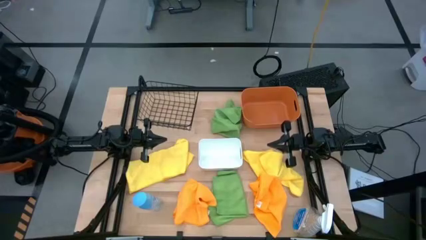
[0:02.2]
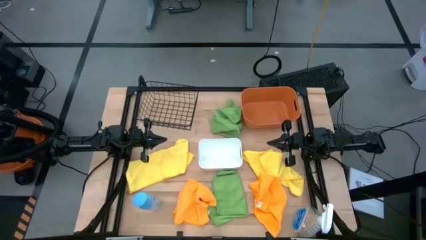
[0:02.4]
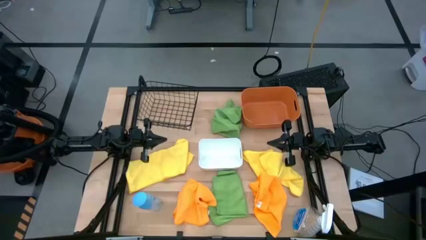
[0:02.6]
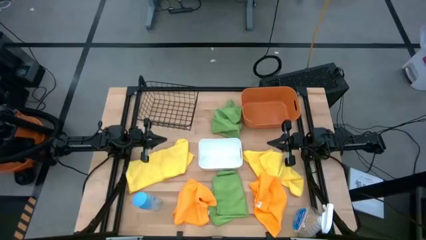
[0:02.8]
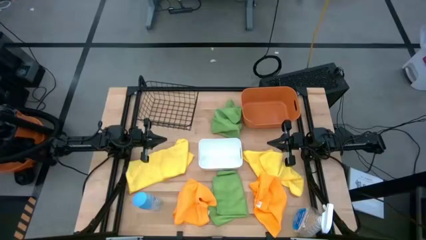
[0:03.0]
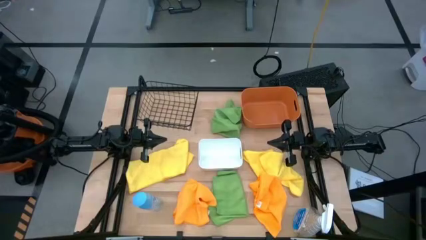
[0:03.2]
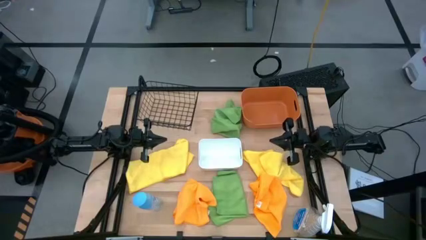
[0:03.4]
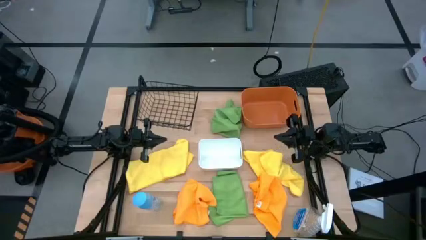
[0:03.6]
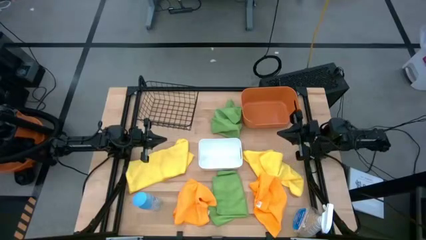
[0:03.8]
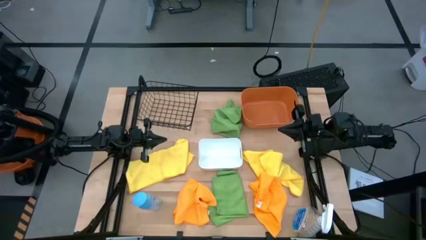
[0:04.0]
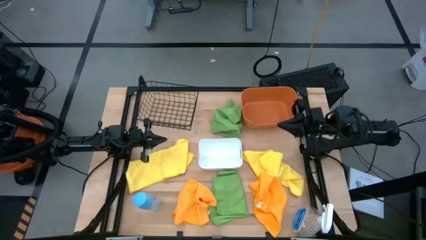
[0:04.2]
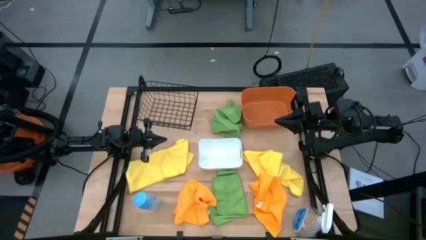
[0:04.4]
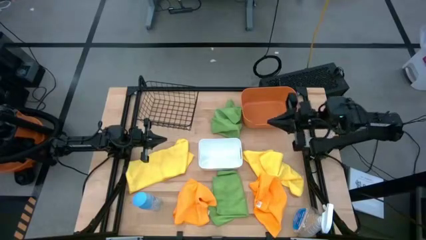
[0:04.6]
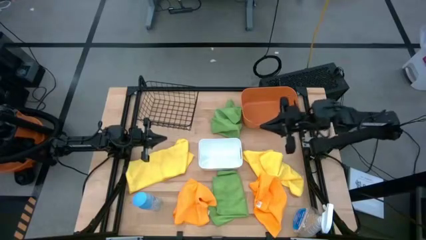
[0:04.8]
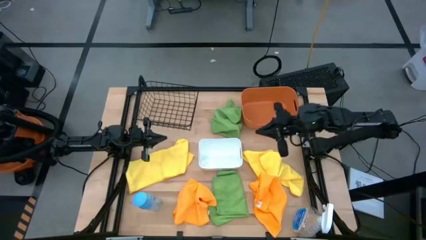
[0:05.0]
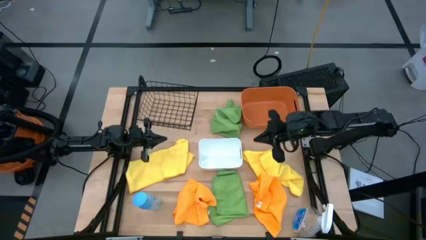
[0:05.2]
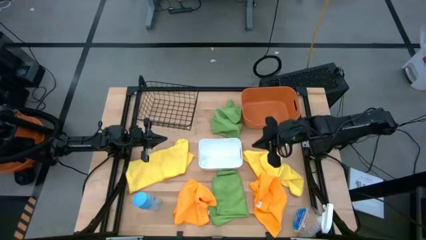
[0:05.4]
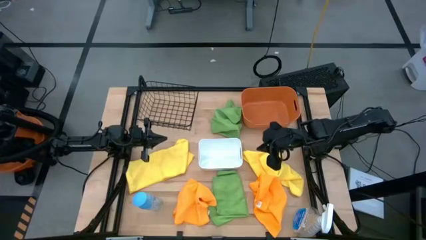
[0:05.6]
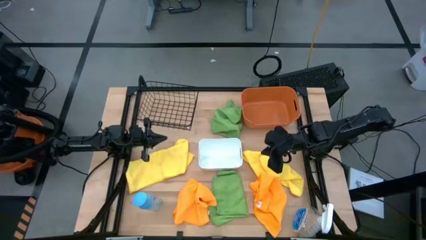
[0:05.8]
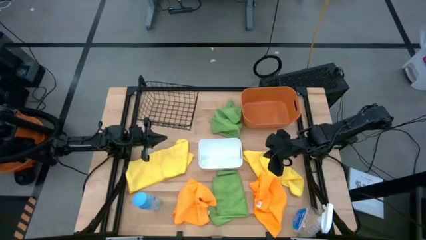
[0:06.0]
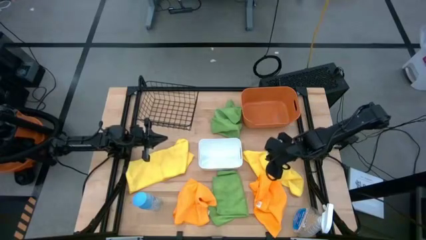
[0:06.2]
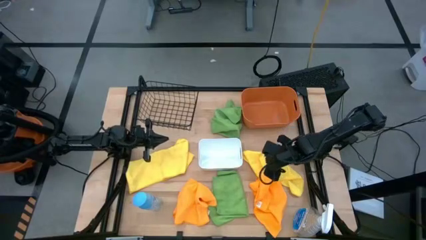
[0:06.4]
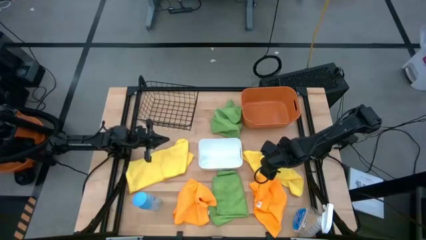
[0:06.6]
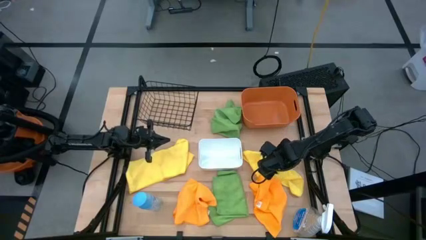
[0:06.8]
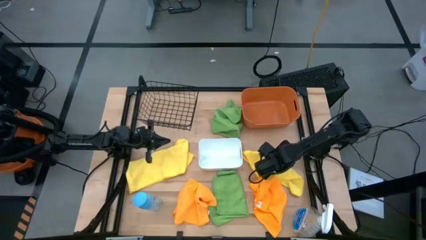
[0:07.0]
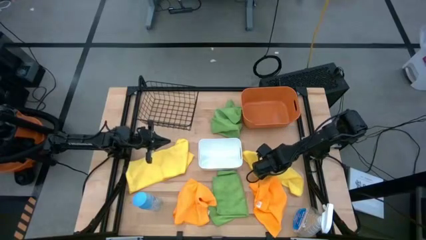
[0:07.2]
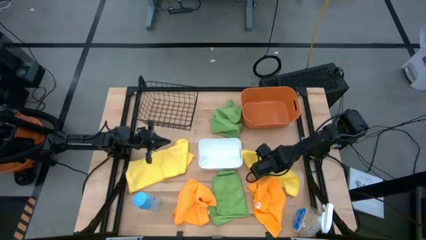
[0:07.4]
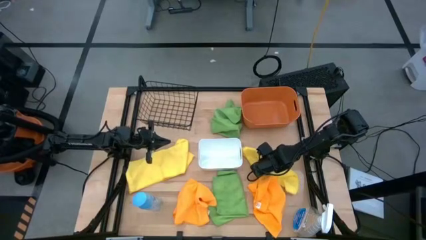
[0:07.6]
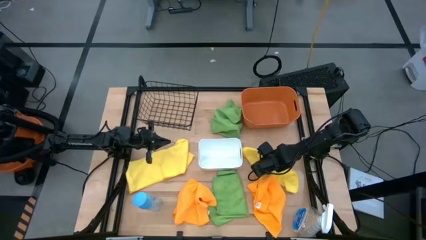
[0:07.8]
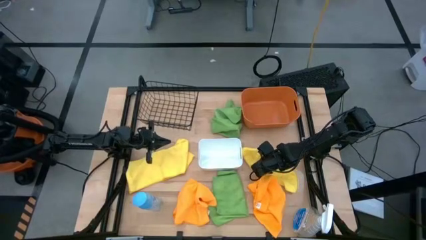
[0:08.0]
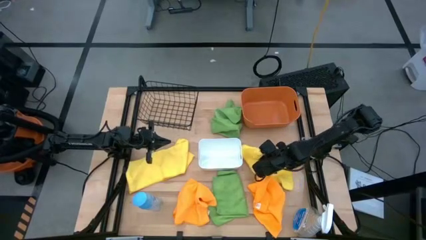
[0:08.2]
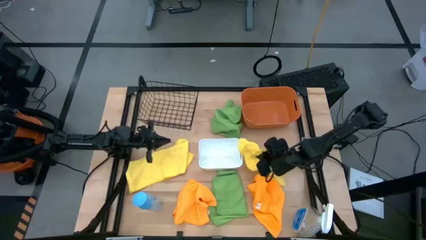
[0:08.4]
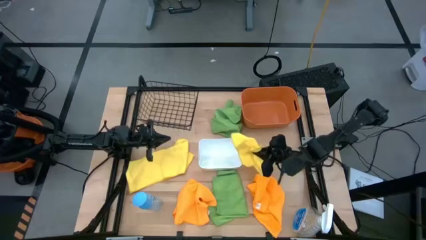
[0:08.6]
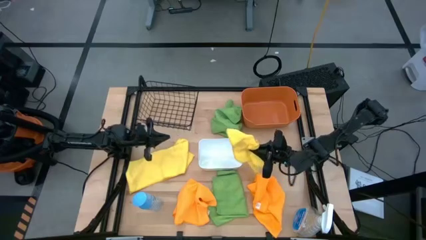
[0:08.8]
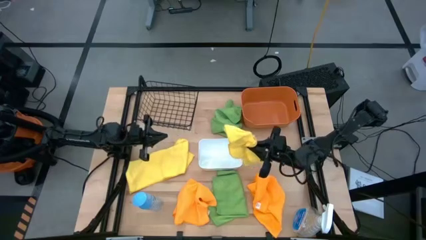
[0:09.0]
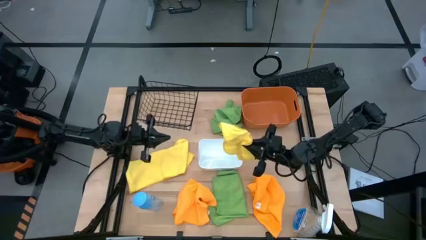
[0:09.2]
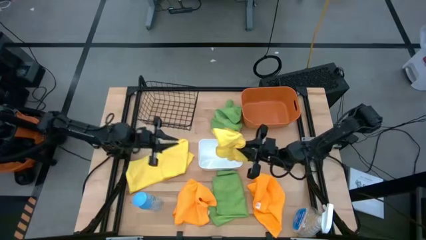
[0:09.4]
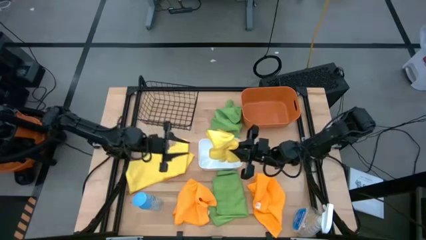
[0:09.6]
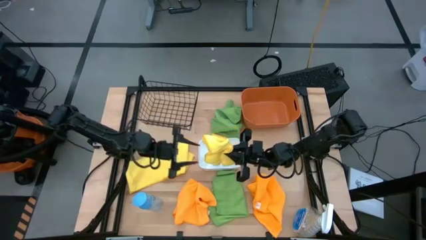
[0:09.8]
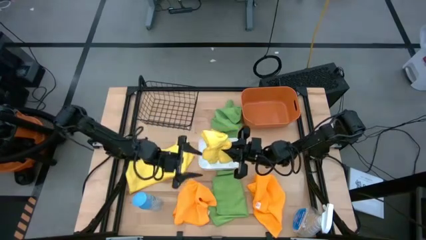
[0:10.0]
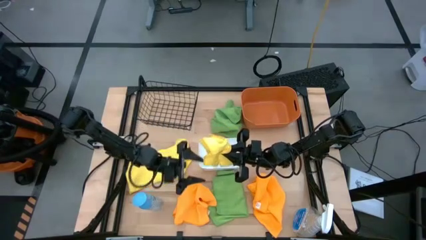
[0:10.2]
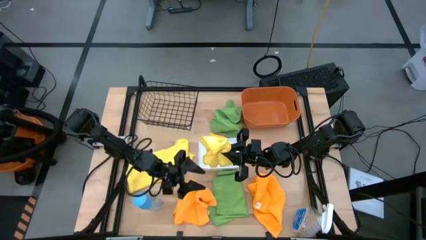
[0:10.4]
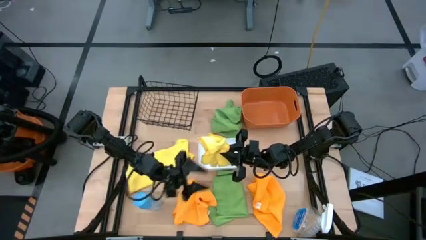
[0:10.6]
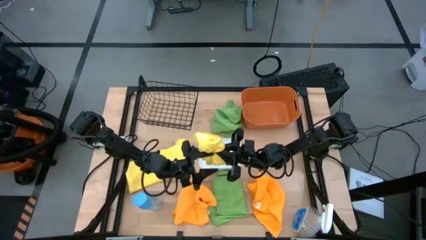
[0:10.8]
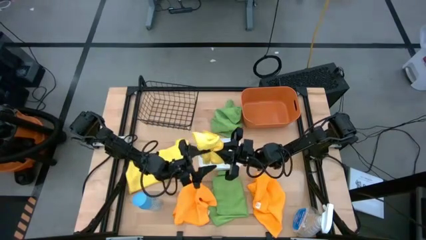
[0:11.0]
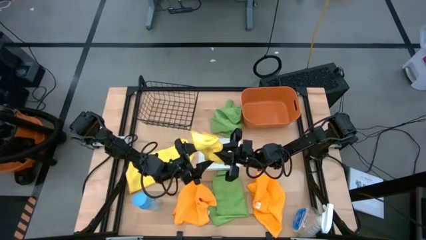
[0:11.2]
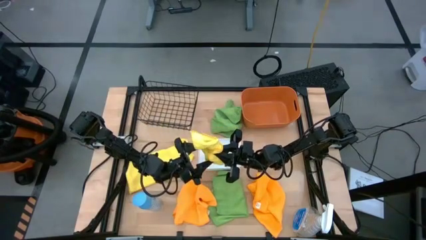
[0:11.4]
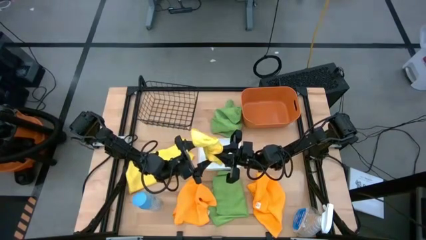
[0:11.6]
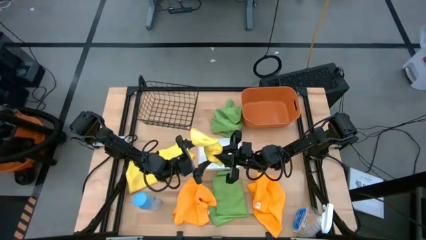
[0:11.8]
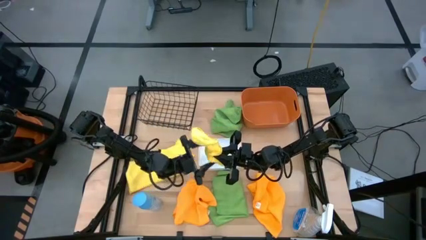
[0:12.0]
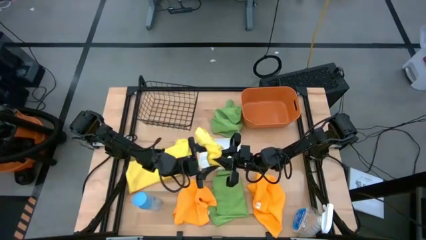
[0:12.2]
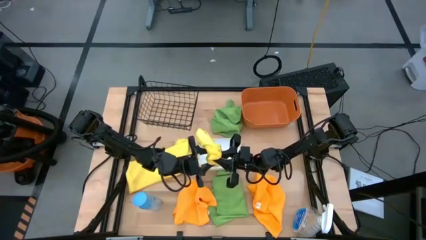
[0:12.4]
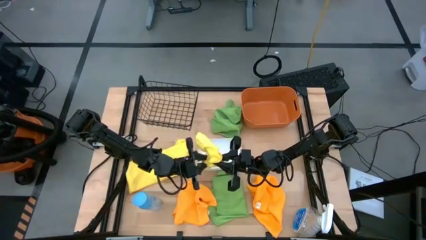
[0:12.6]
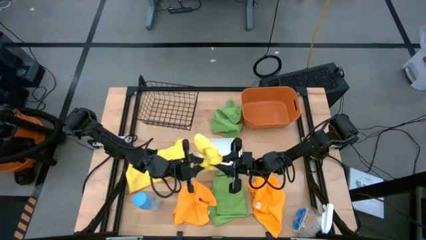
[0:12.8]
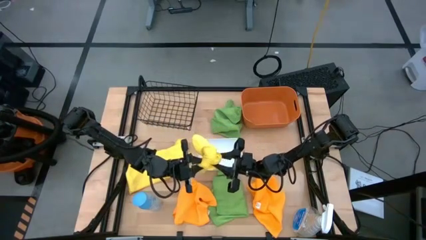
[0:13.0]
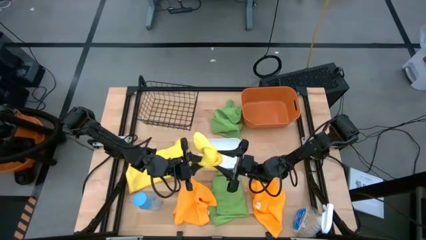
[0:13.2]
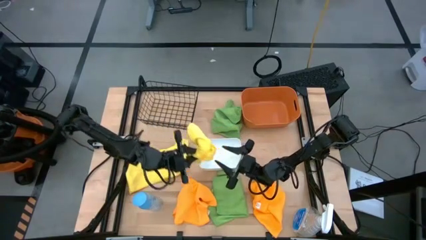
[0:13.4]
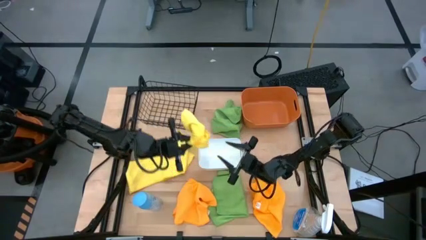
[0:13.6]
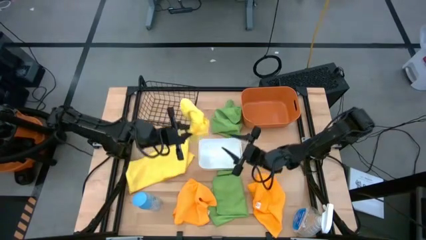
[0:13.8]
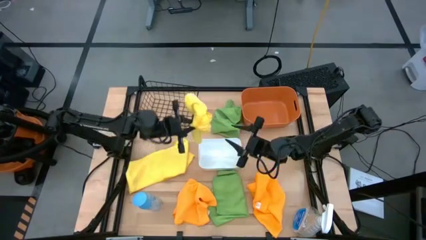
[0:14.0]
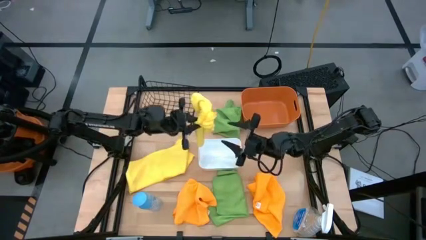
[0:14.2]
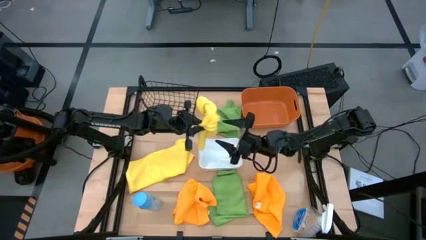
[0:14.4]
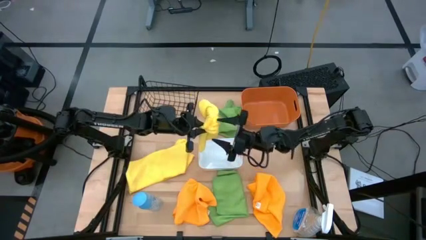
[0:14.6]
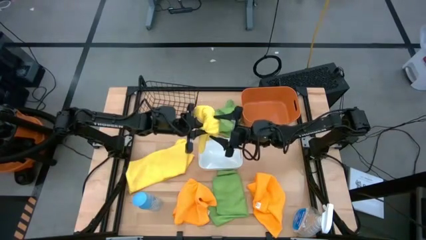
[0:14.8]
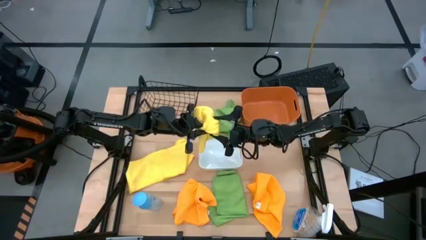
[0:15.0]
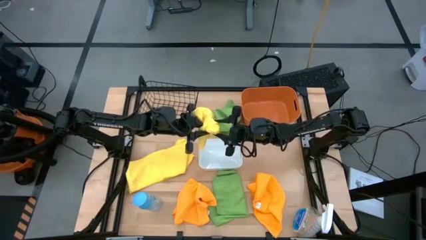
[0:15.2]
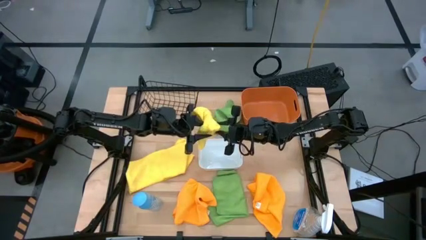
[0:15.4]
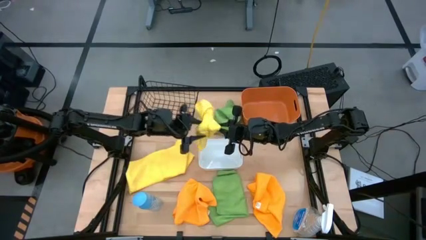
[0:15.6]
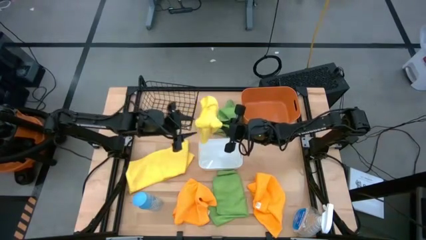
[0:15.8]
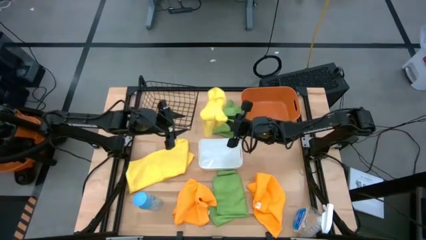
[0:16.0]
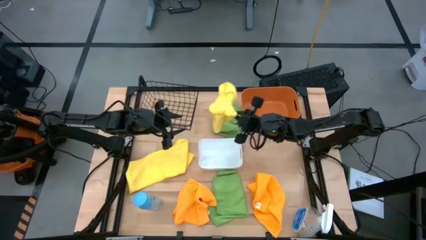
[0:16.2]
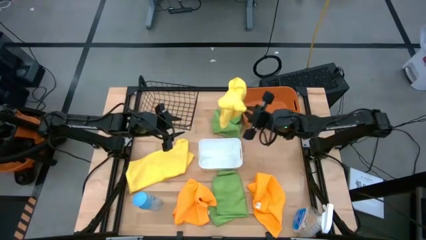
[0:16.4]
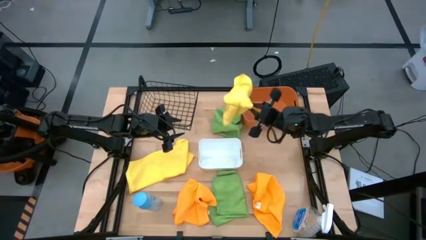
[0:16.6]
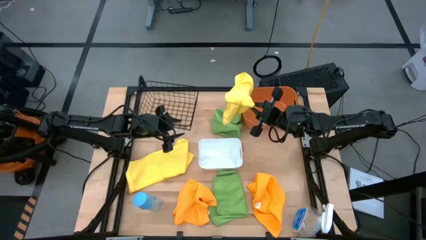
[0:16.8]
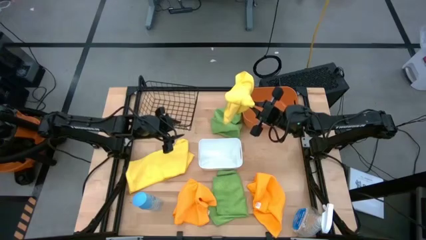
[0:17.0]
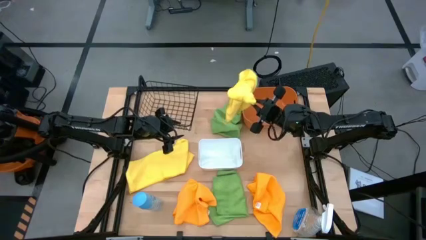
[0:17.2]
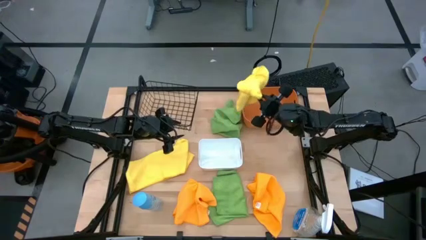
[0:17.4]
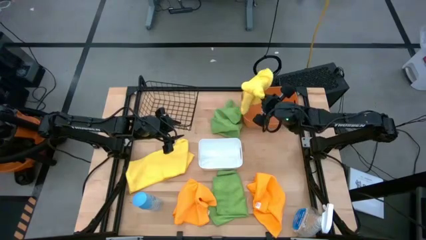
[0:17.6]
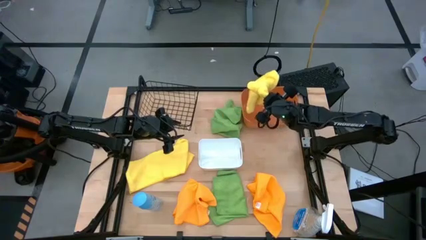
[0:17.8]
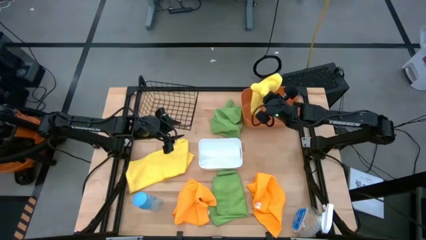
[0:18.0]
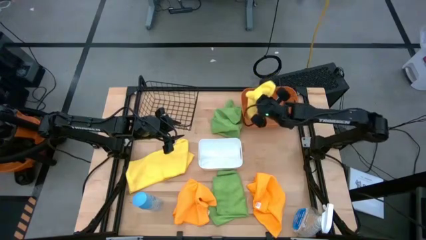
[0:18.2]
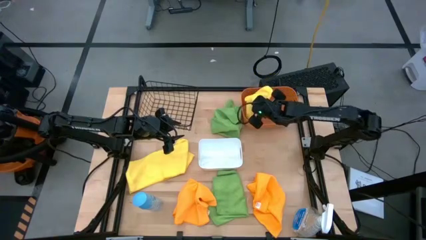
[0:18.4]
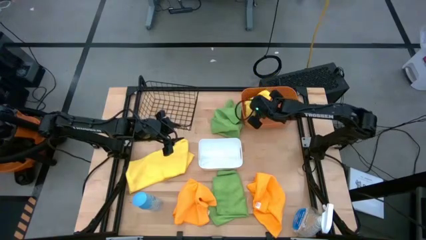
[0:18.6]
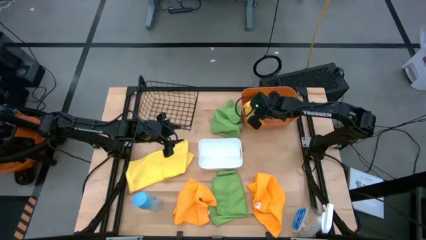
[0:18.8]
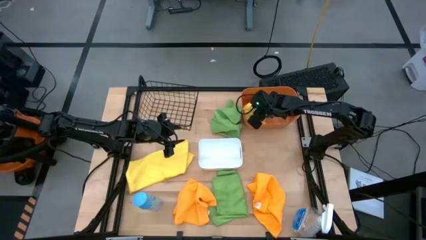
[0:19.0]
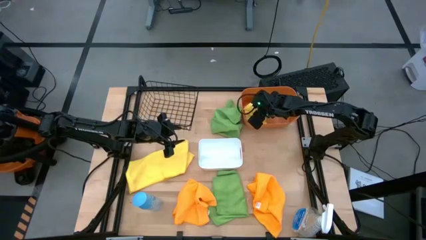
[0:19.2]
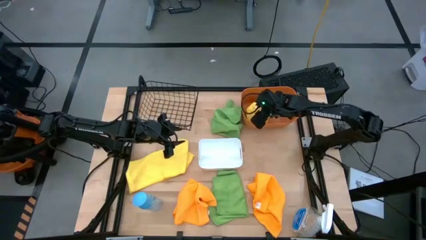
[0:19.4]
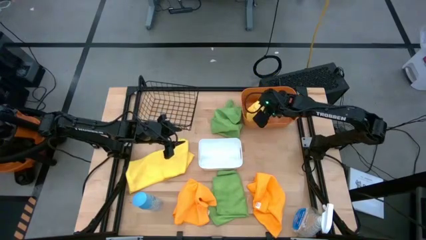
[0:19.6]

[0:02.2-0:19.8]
Task: Sort microfiber towel by color & place in baskets
Put the right yellow microfiber cloth into the orange bin
